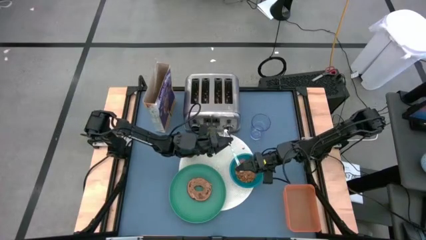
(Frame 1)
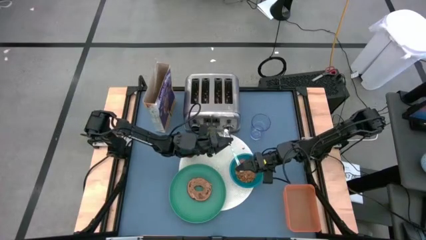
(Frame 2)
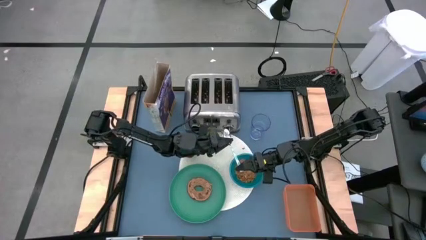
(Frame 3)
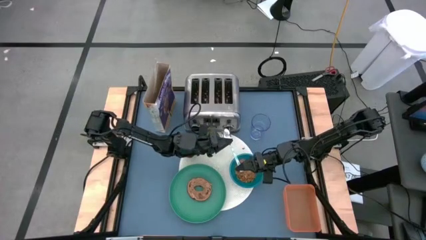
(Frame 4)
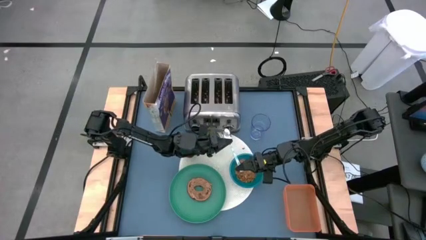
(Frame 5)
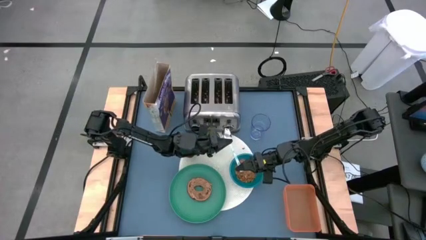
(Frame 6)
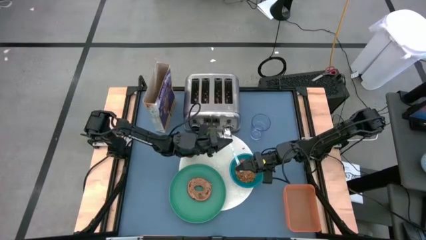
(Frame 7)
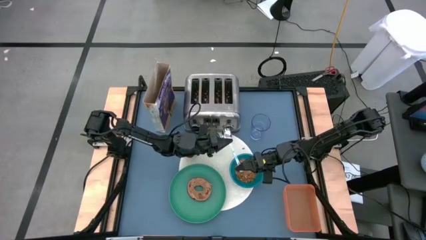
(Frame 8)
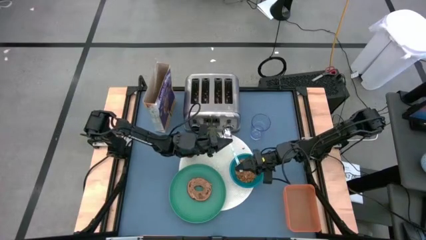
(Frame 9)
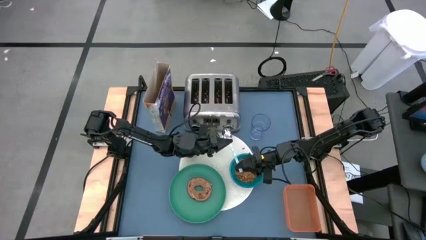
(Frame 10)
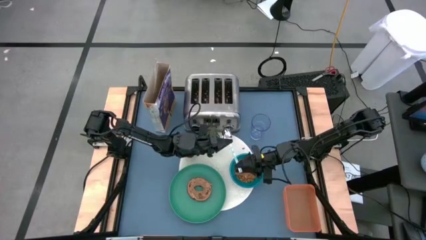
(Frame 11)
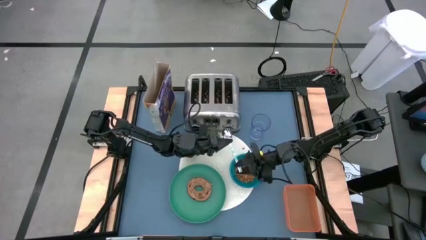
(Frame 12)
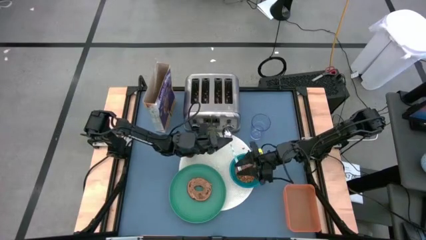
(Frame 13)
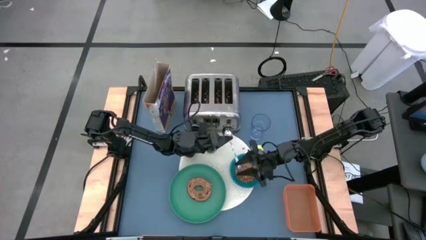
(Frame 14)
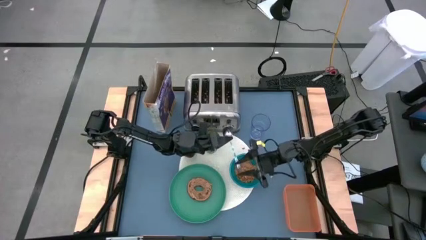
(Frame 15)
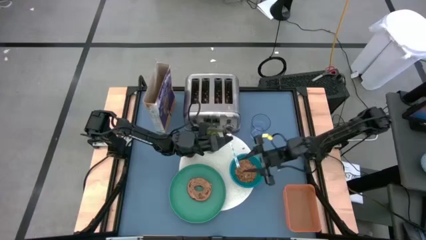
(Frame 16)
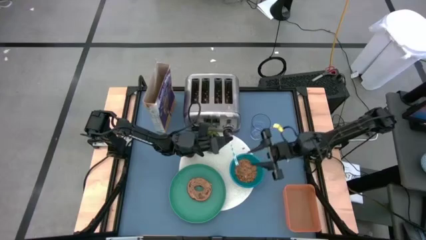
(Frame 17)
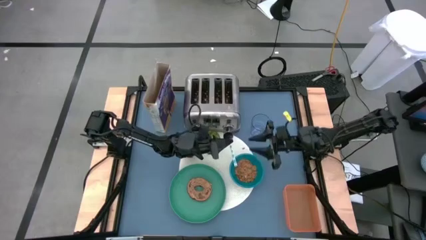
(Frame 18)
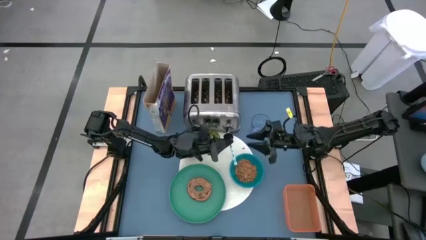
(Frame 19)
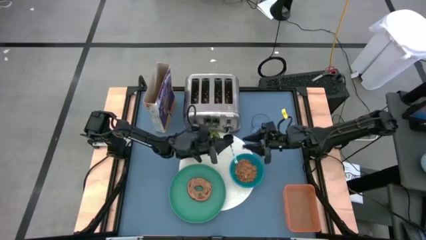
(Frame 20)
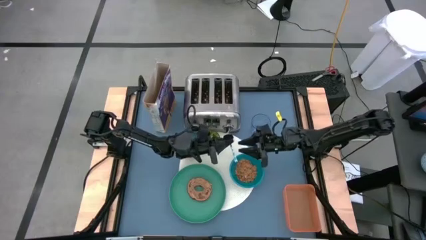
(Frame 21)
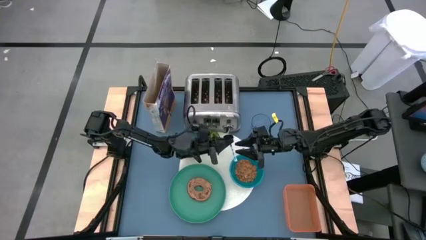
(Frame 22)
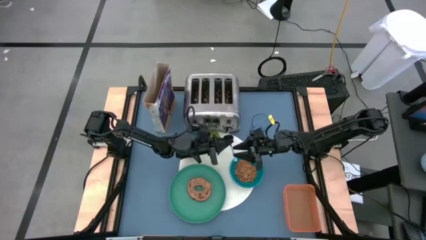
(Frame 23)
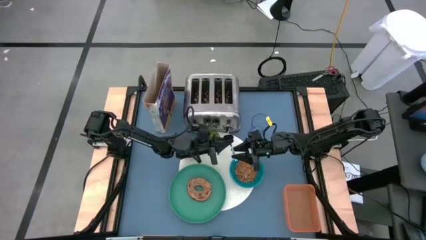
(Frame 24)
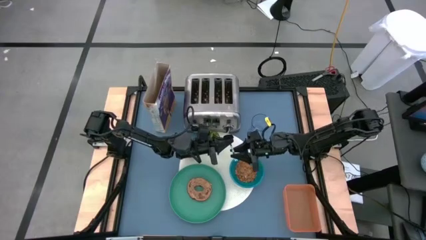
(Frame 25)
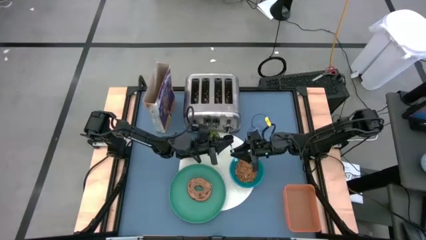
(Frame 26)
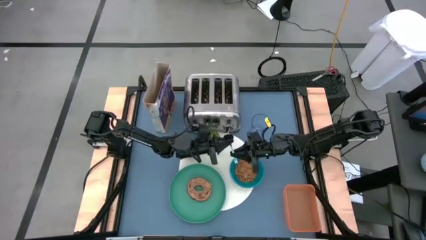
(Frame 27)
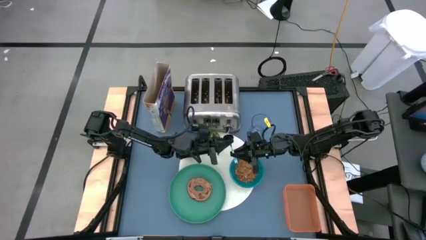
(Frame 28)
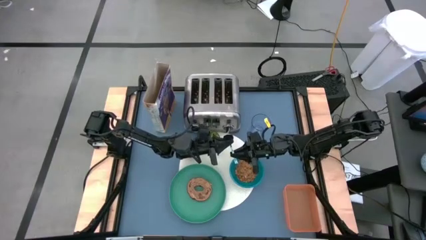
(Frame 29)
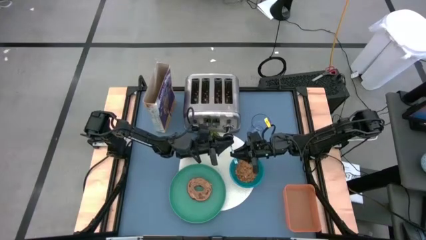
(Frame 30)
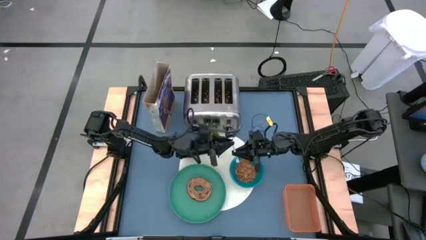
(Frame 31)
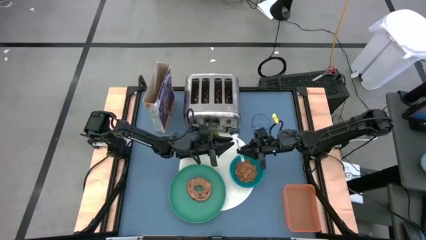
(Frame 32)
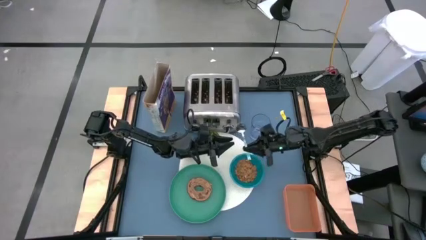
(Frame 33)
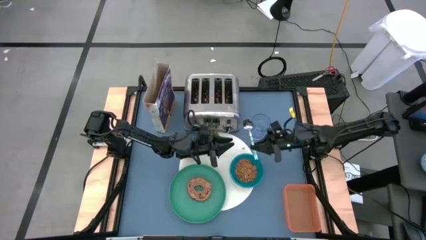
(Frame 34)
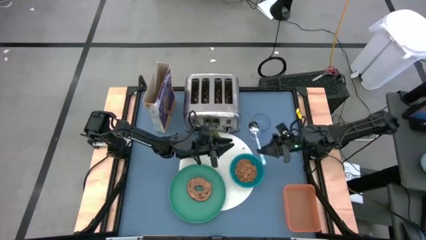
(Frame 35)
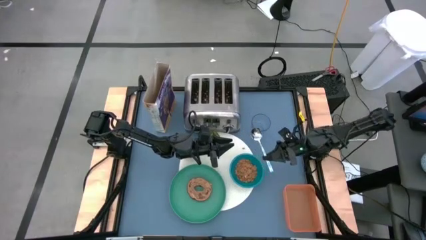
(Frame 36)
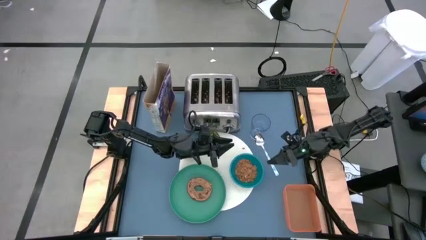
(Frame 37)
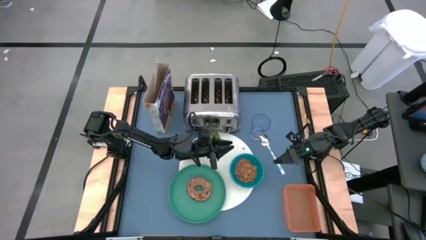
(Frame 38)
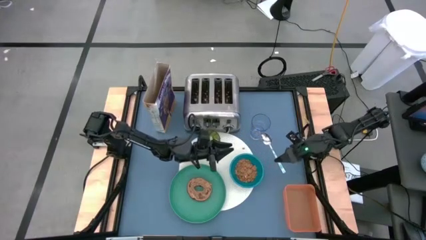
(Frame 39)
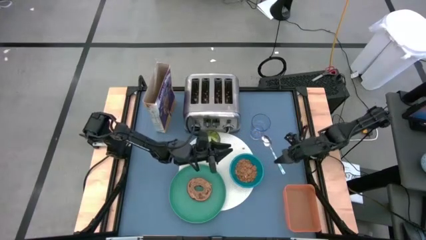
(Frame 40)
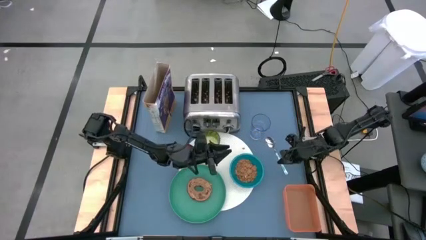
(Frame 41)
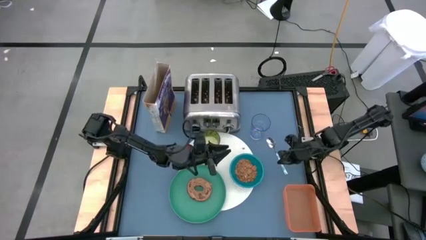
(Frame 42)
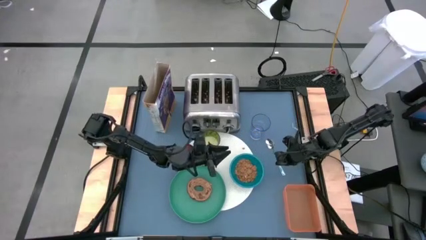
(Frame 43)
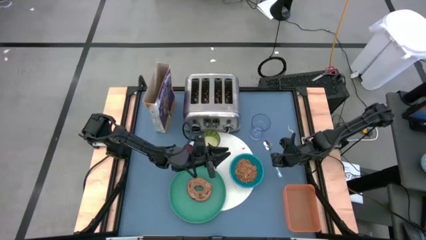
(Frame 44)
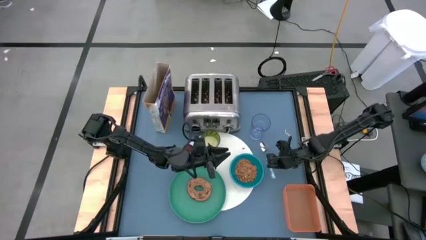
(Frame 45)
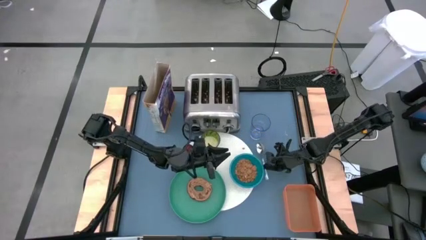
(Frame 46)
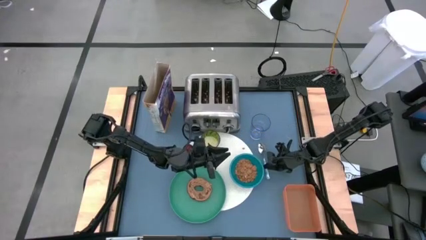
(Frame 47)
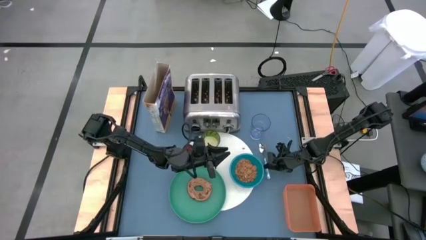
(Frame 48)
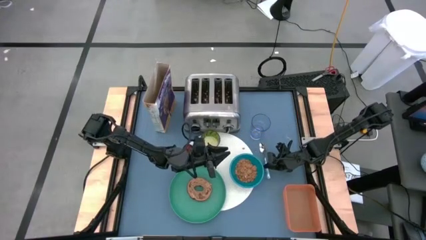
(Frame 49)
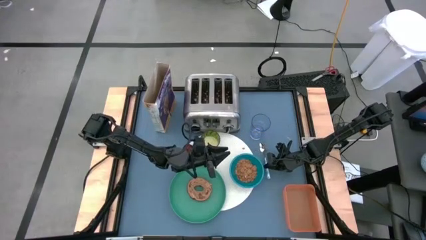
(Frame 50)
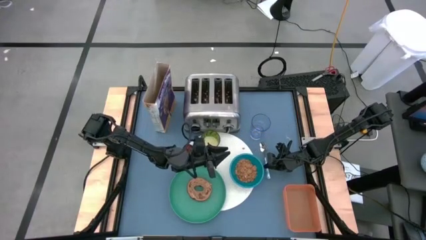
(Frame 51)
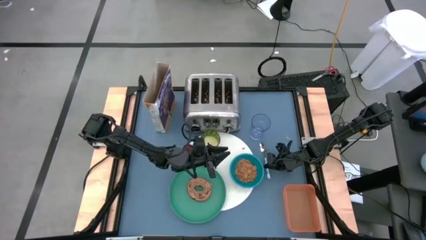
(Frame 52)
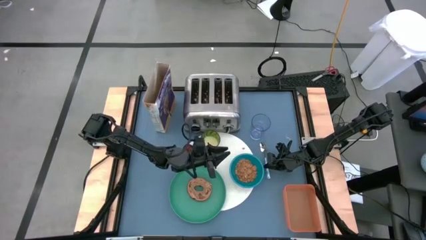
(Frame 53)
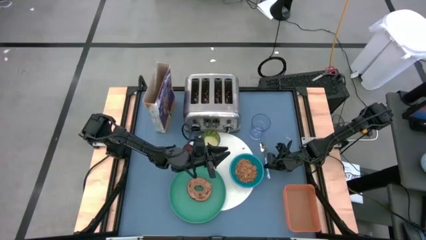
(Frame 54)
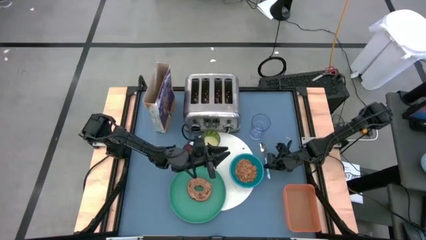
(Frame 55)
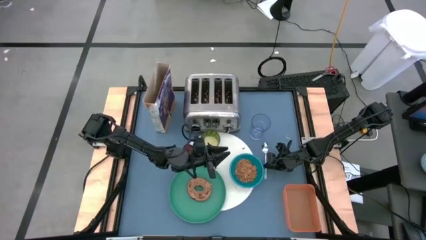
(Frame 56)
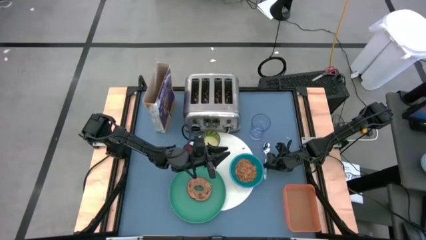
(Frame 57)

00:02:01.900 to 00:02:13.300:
Task: Arrange a breakfast setting
Put the blue spoon to the right of the blue bowl

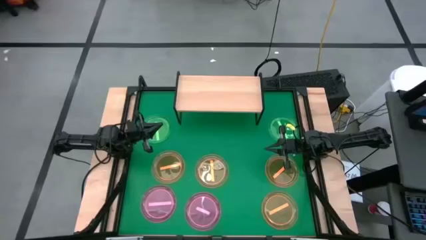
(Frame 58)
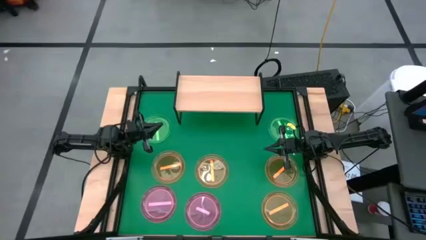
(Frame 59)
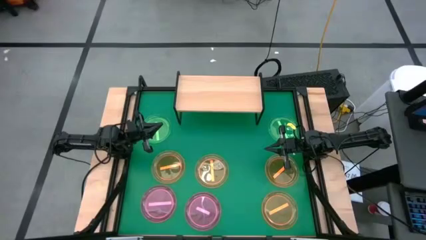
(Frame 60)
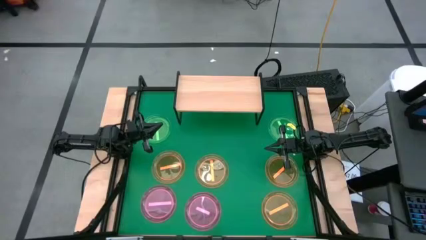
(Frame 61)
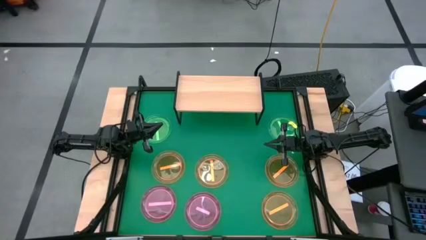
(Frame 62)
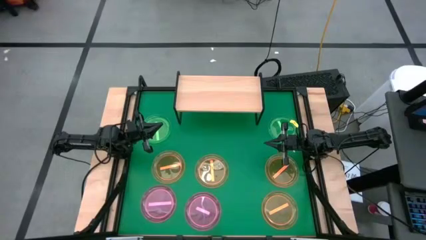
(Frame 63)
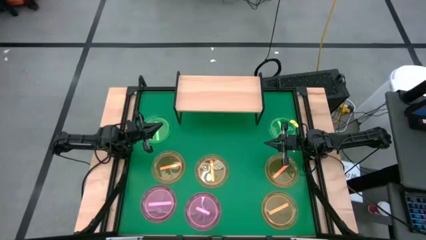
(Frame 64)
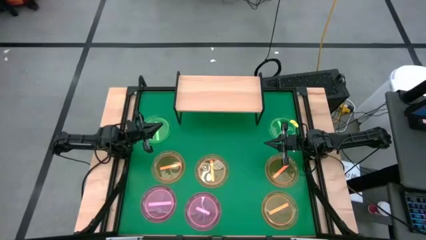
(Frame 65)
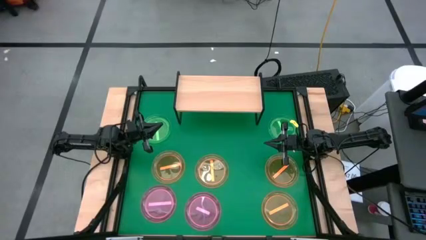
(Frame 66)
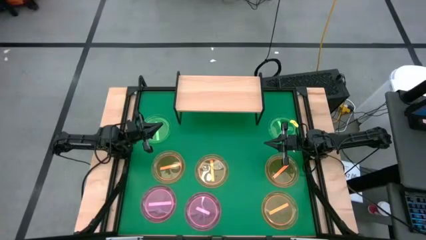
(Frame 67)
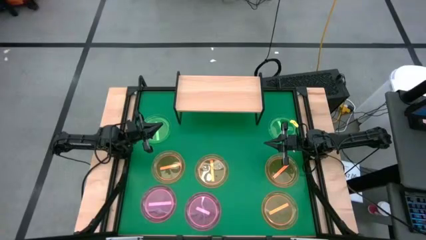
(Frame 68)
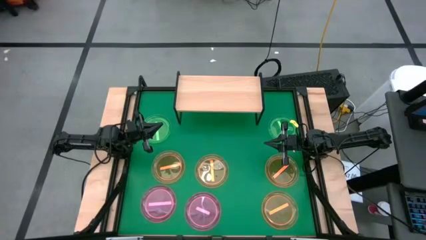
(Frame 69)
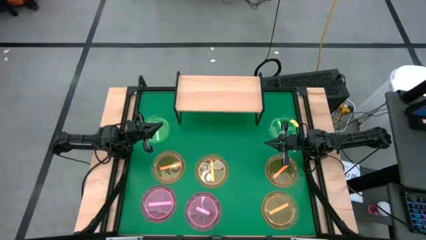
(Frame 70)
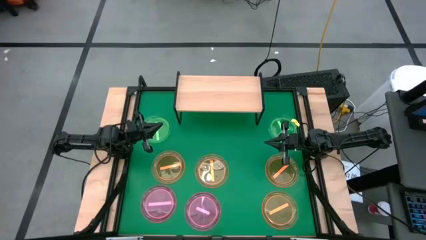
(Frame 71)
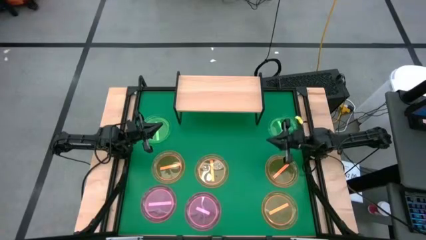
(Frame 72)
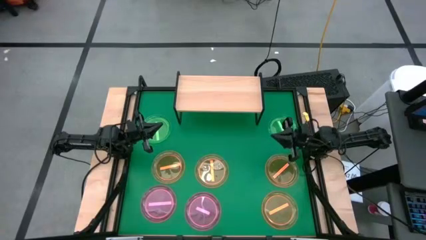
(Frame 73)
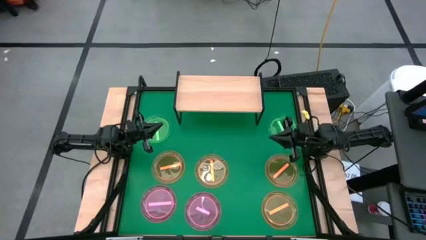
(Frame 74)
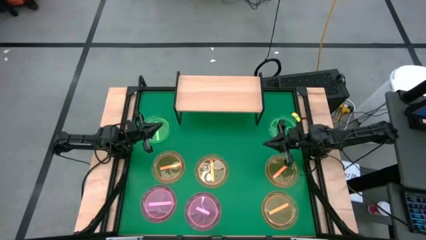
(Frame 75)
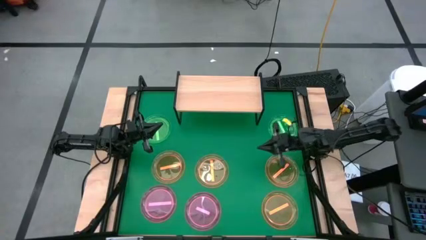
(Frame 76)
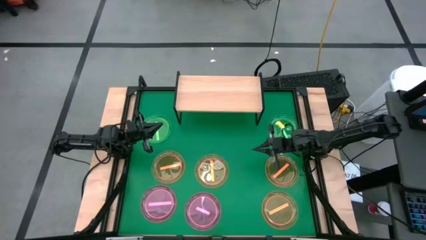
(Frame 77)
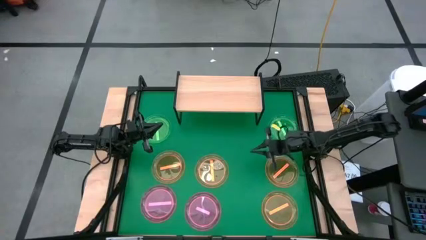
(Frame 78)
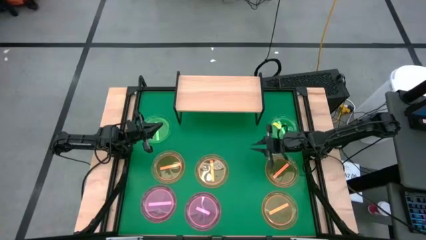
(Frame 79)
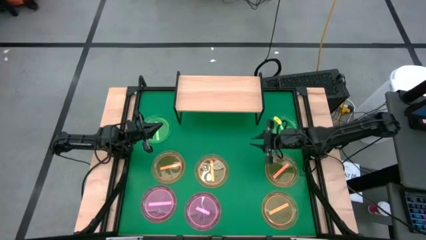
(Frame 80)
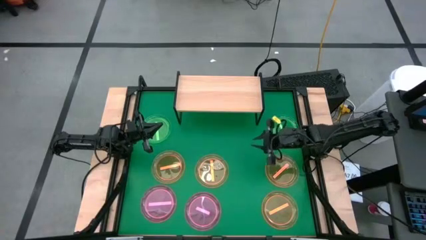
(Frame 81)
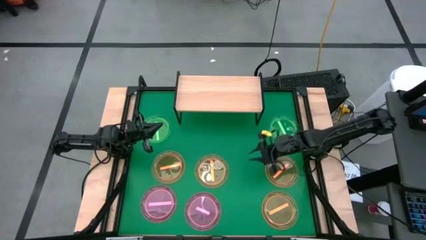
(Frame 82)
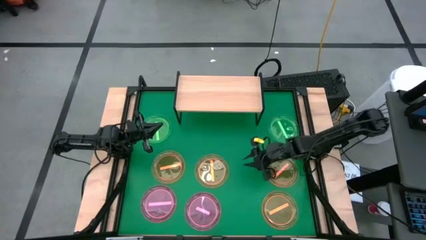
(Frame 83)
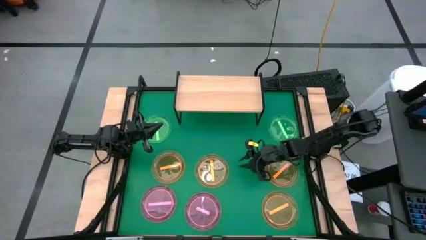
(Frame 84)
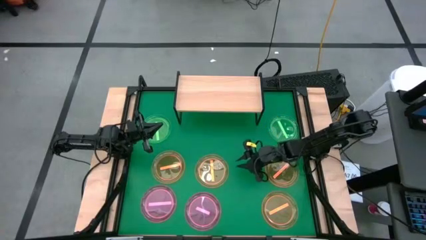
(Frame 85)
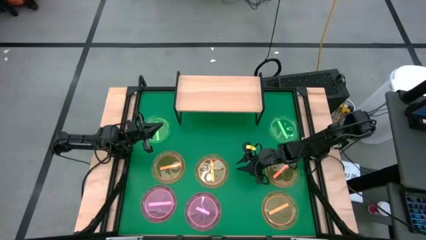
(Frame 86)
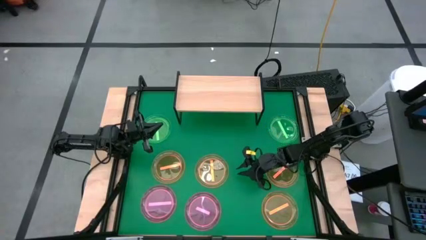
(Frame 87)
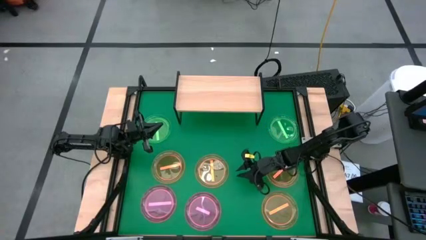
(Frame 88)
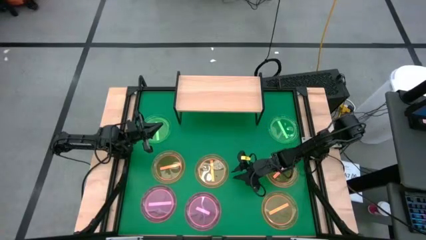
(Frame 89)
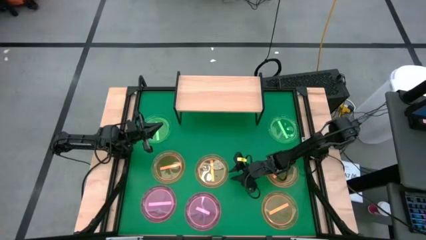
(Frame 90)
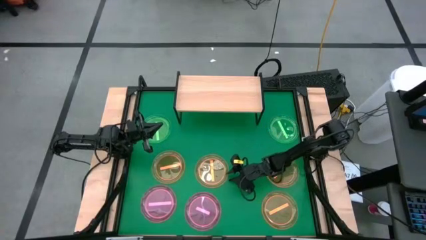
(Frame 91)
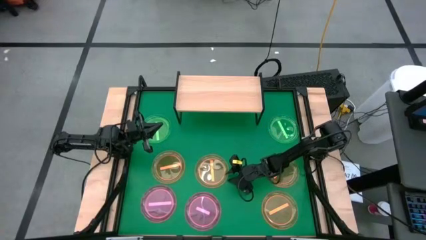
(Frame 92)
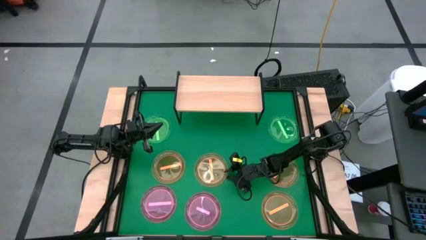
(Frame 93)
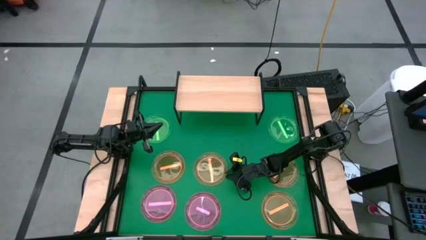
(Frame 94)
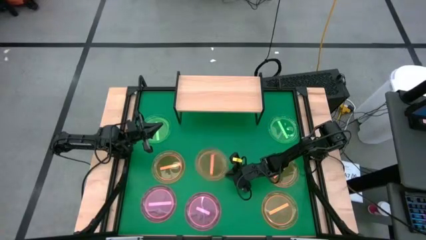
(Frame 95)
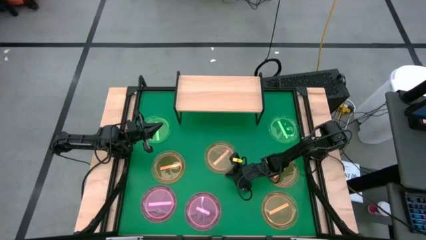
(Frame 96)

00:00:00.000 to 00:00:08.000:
Task: Place and stack plates onto a shelf
Put the middle orange plate on the shelf
